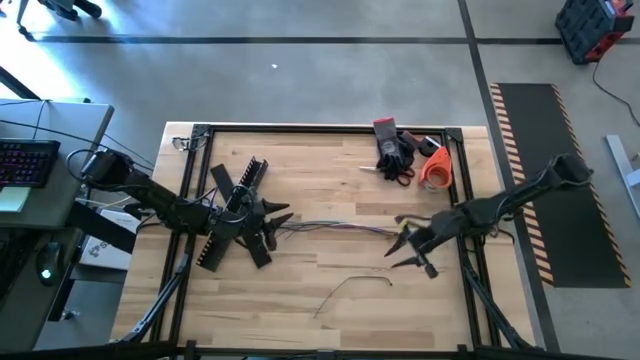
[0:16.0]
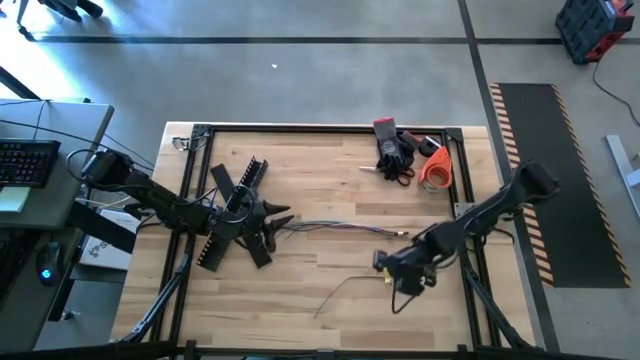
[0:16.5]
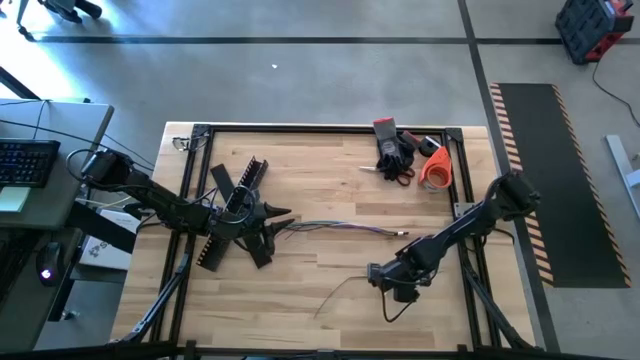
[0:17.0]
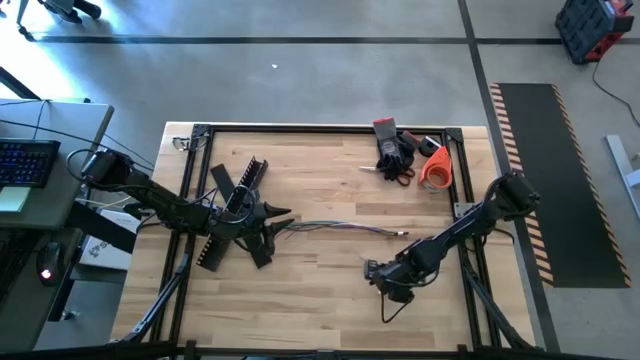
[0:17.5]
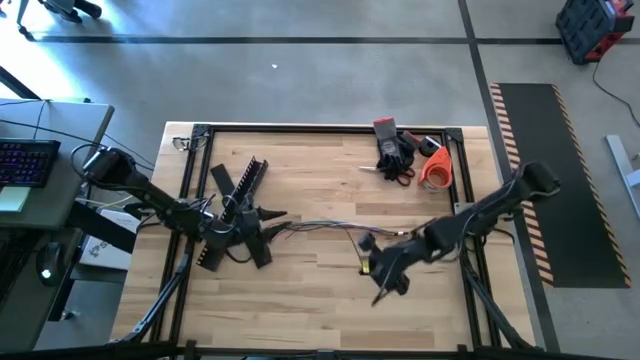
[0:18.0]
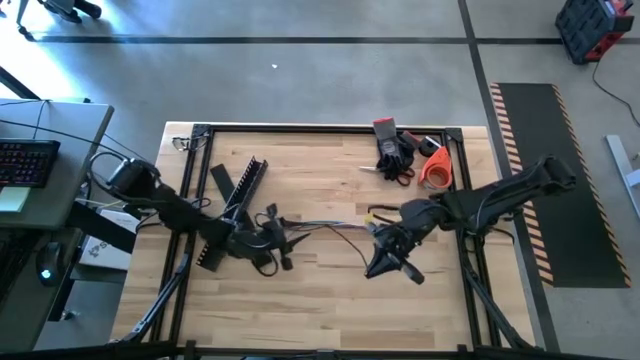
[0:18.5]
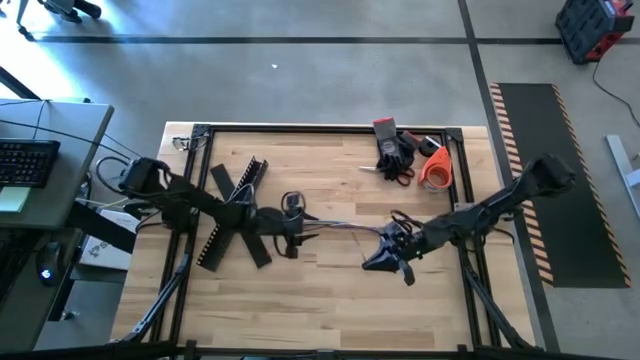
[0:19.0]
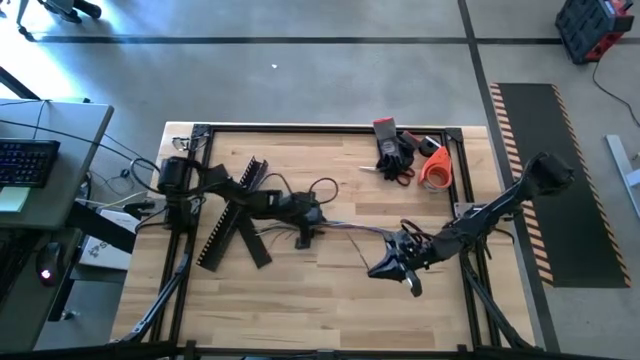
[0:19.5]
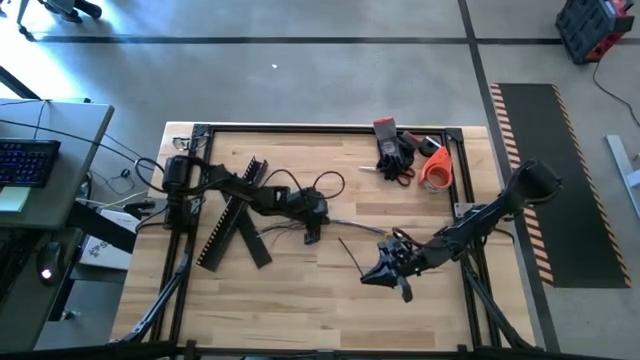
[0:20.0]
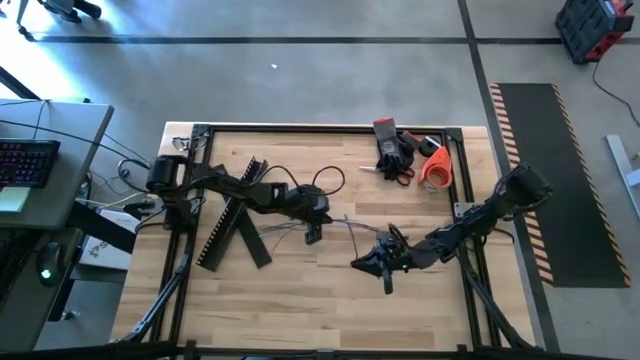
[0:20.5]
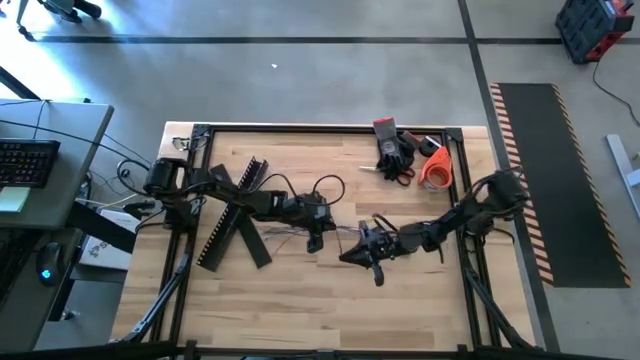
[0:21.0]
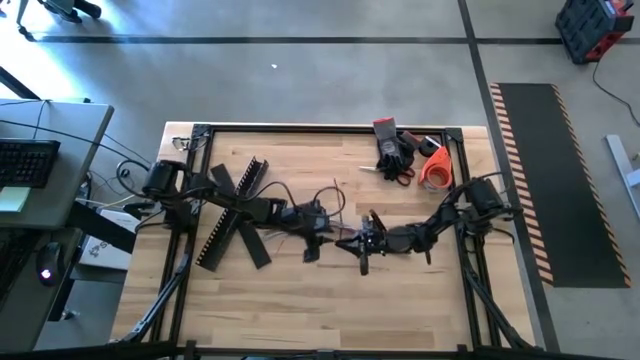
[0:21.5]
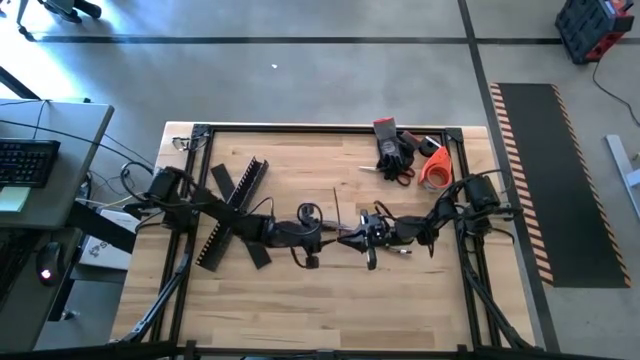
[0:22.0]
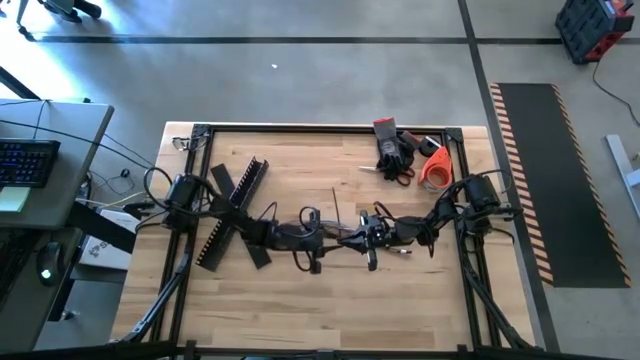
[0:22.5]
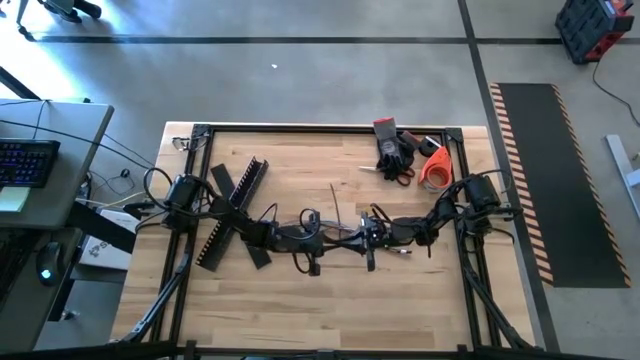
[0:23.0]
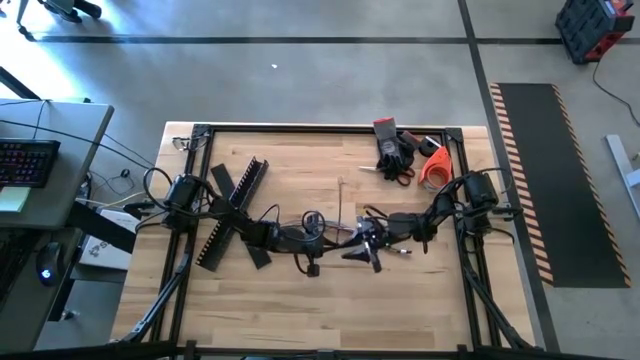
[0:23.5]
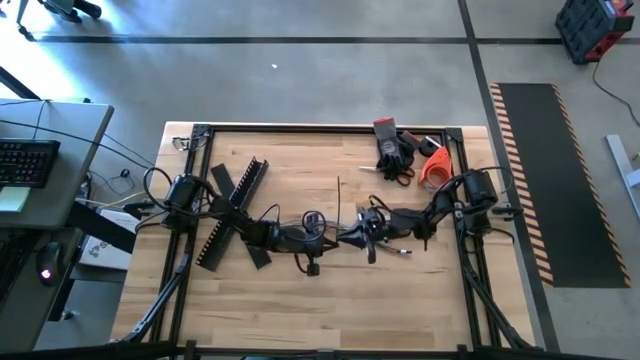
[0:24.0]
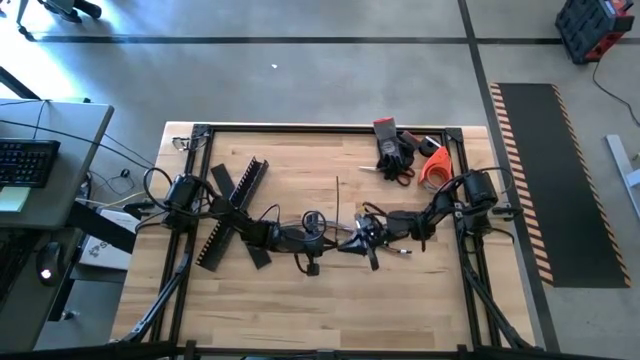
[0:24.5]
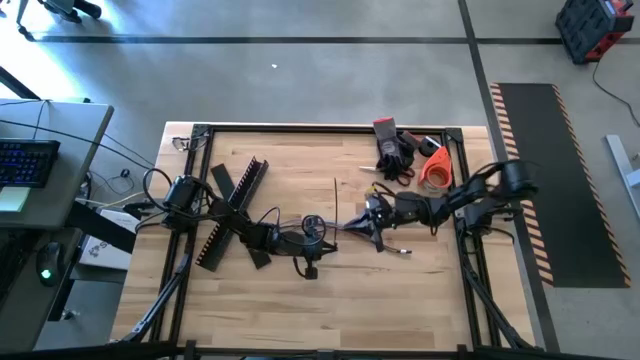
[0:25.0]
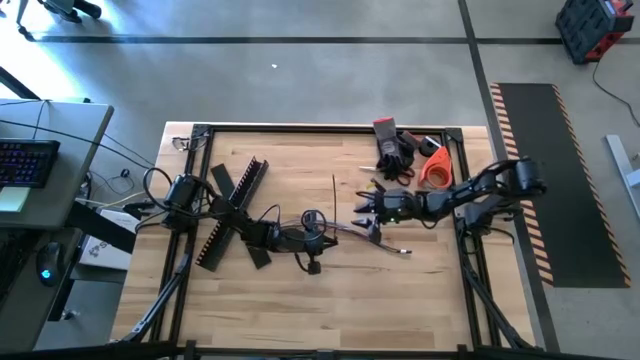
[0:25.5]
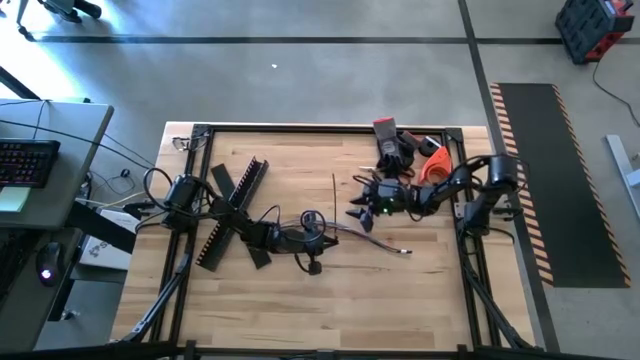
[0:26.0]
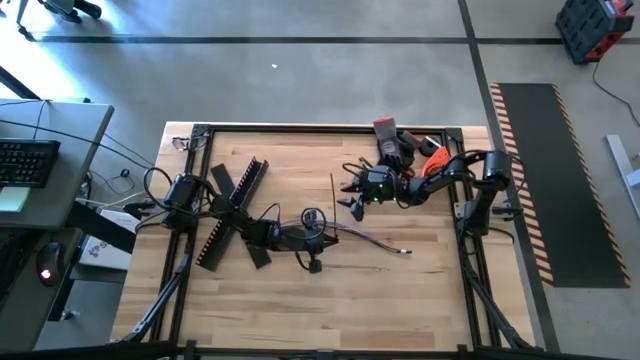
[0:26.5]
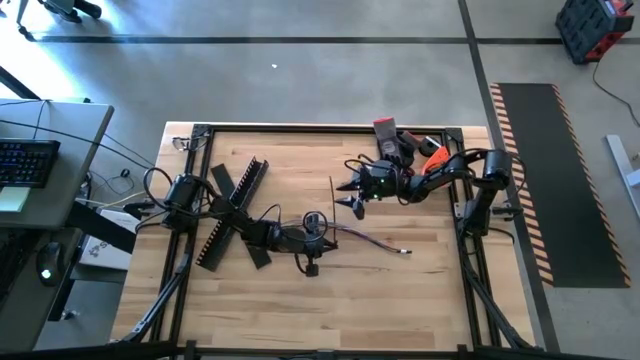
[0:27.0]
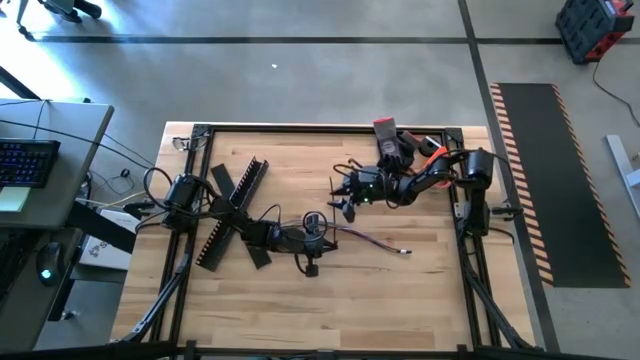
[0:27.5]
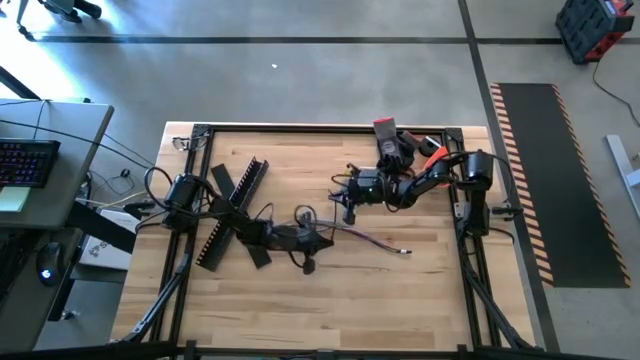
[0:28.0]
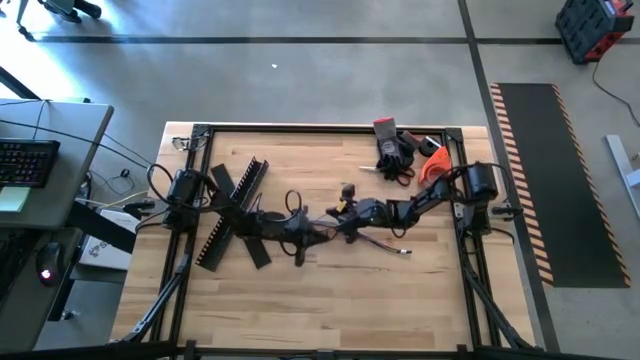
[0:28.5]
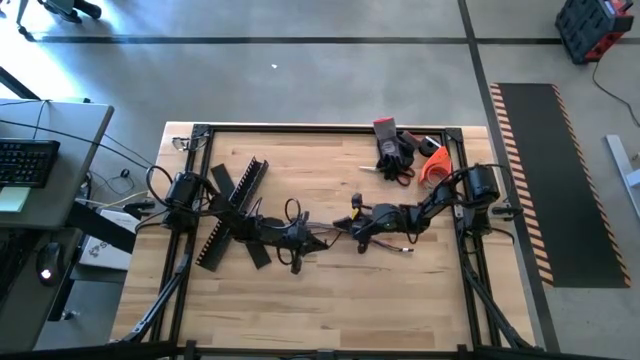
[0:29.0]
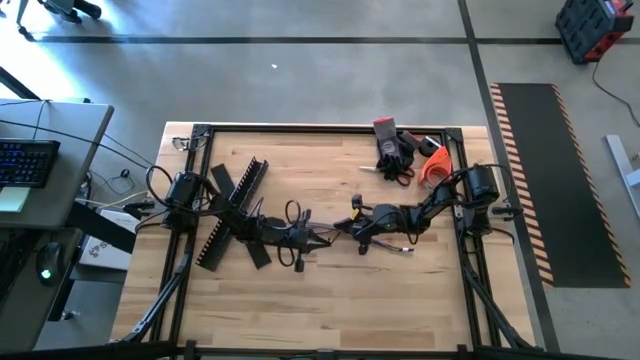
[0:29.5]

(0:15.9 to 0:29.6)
Task: Ziptie cables
Wrap the cable wires with the black zip tie
